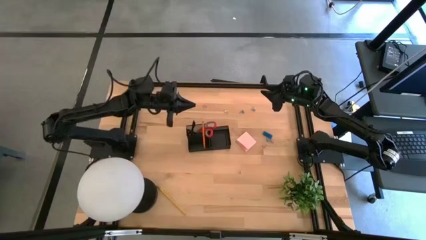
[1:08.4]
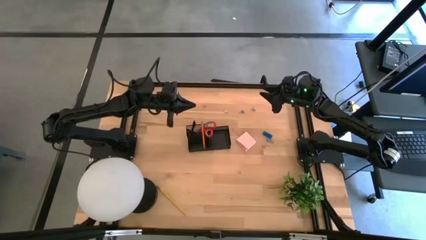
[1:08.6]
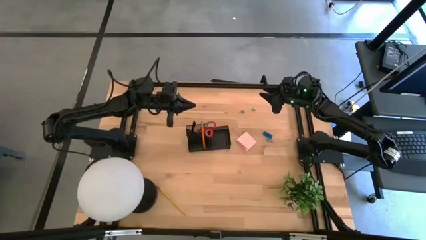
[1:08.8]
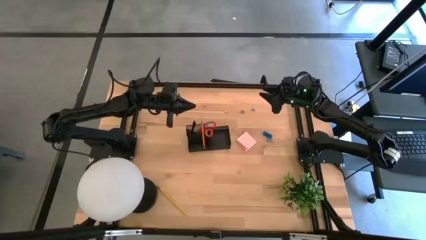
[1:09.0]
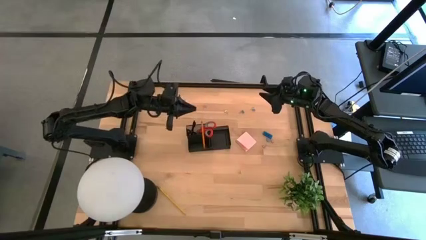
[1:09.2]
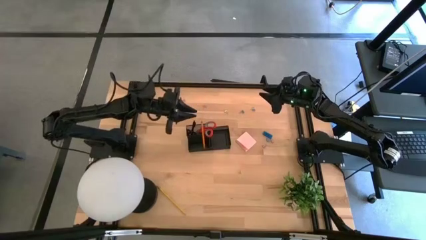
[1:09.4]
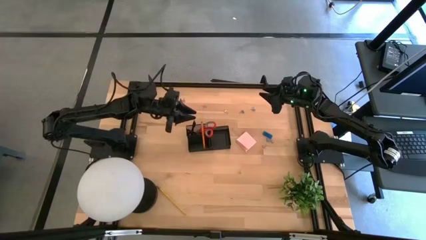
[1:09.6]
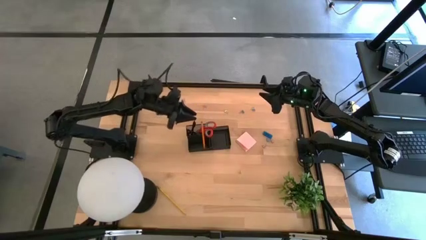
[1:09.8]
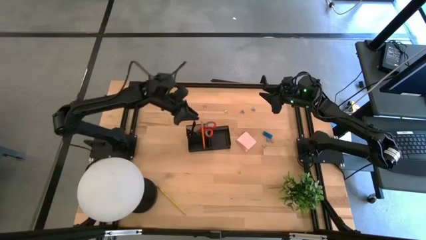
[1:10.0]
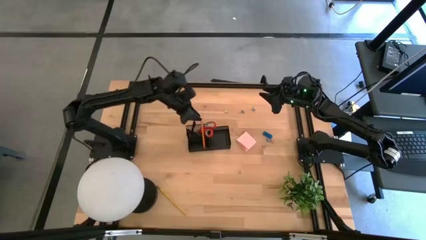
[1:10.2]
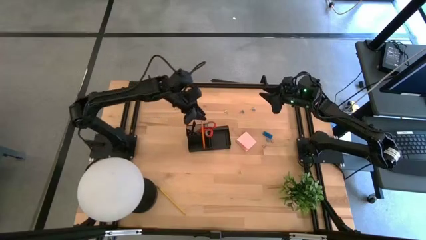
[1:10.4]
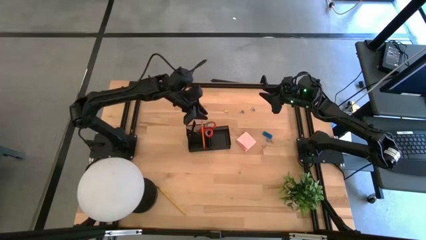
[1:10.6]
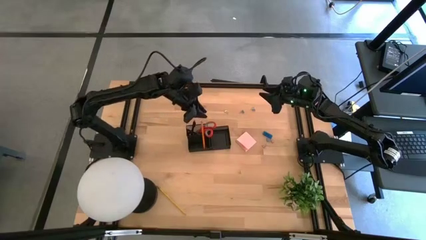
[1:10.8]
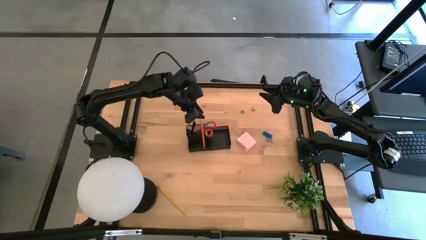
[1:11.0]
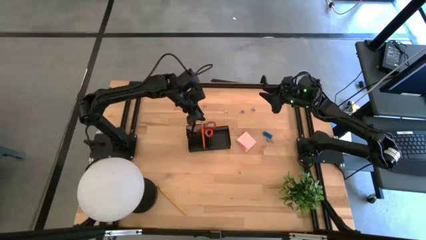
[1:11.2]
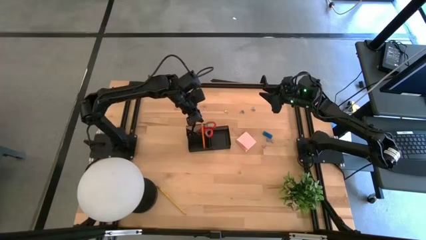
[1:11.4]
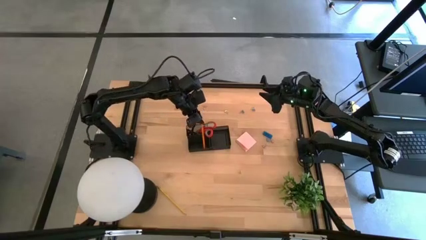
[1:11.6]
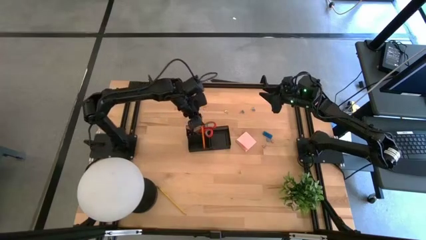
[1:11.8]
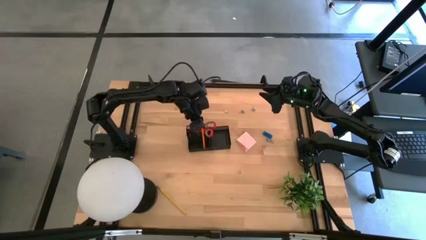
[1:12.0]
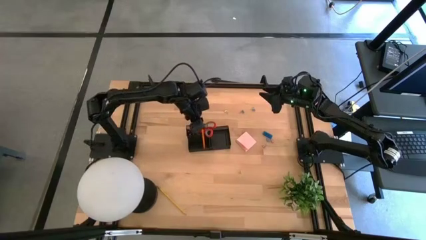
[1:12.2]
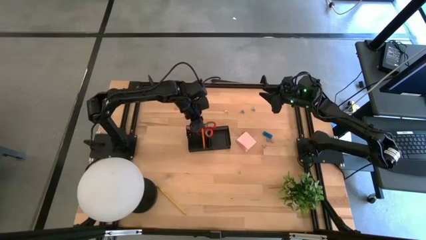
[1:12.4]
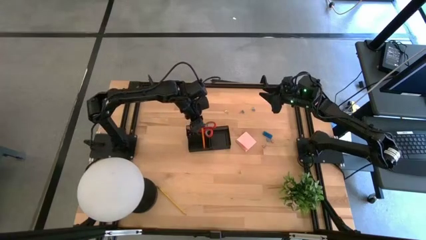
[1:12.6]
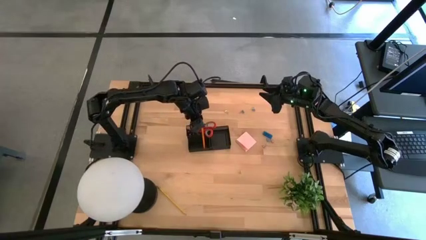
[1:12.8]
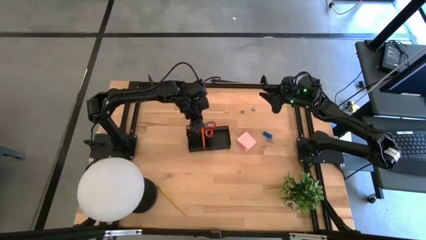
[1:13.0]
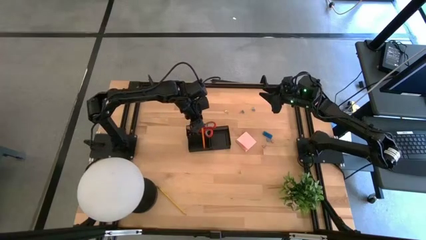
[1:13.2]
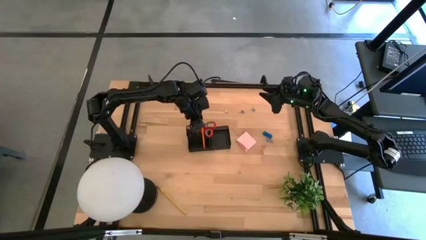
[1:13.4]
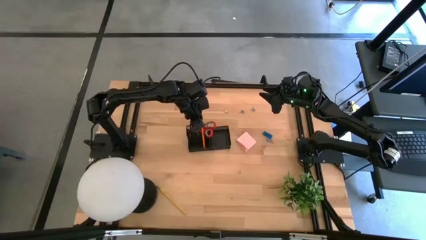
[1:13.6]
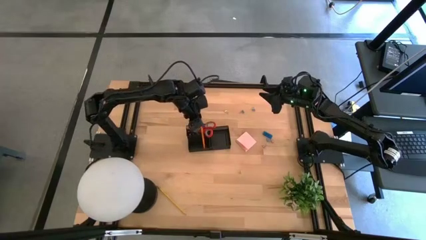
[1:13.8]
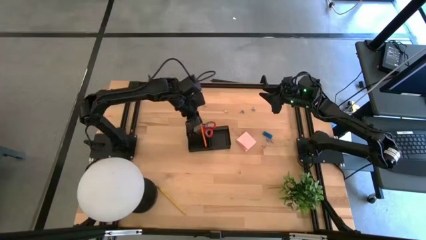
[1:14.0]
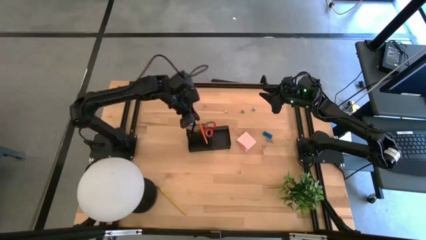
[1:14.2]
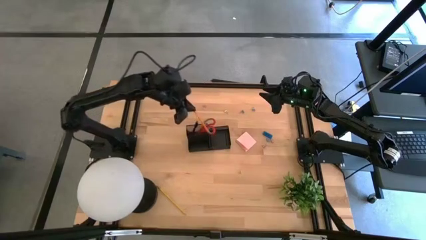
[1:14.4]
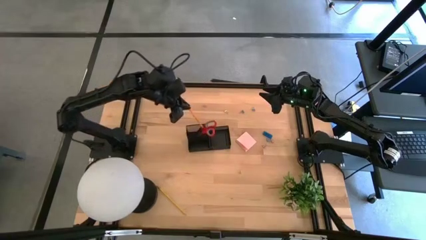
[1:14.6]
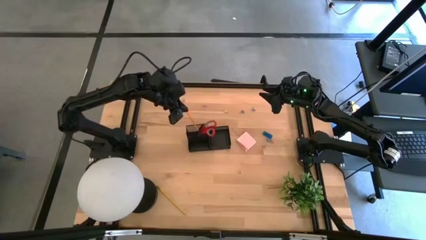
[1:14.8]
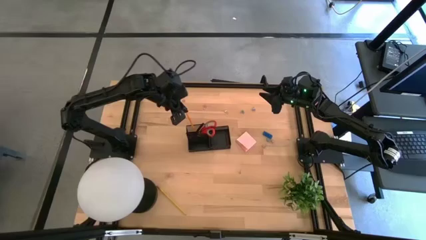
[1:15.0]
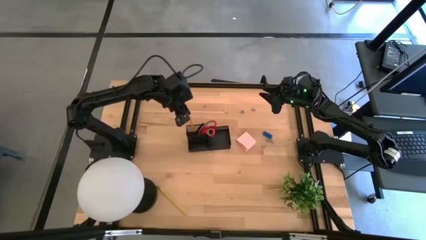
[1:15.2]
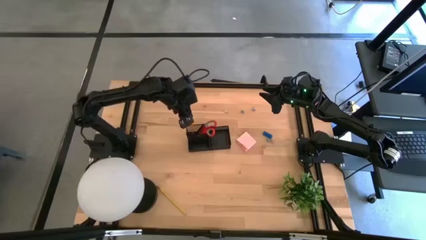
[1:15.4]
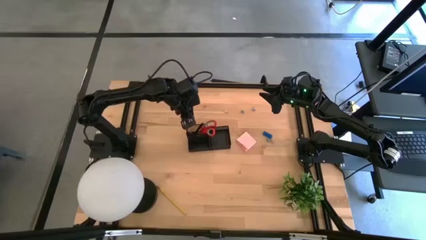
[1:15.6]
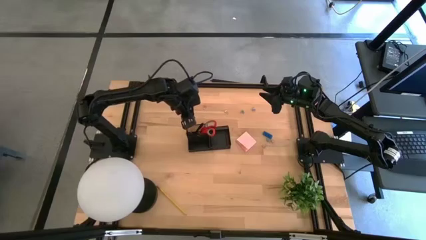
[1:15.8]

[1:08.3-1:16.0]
Task: Pick and place office supplies into organizer
Put the orange pencil into the desk organizer

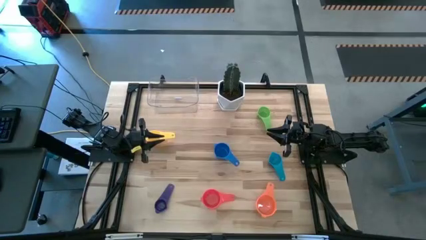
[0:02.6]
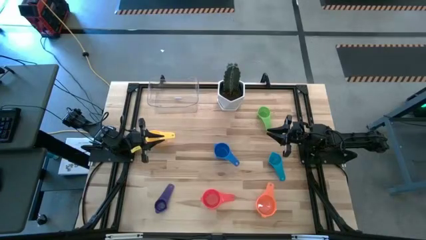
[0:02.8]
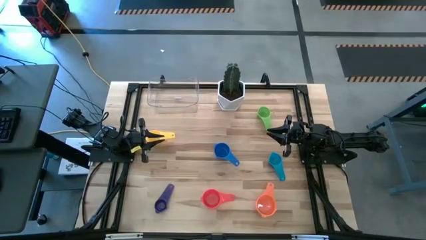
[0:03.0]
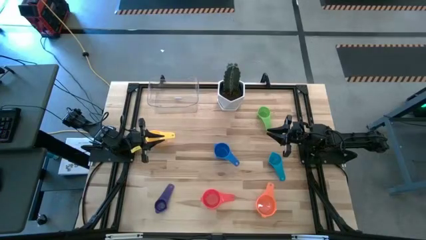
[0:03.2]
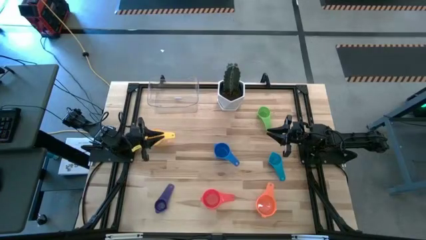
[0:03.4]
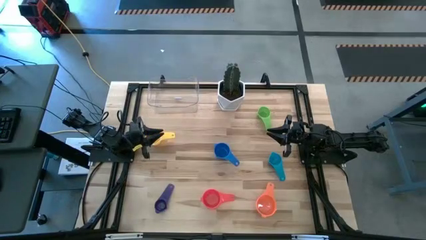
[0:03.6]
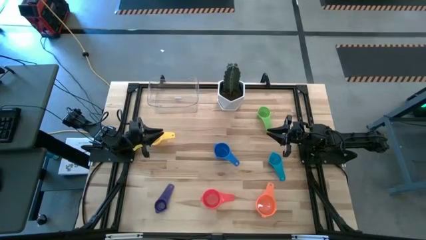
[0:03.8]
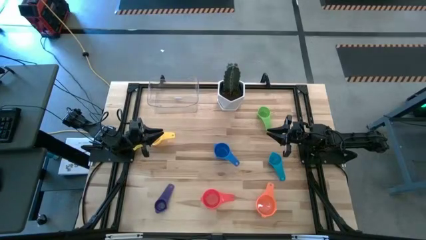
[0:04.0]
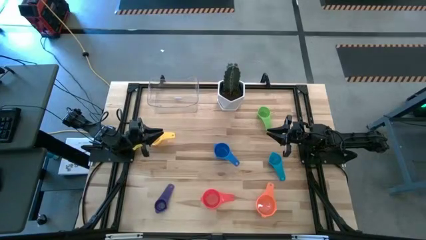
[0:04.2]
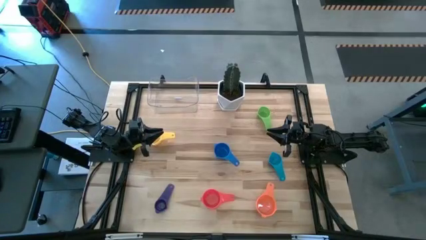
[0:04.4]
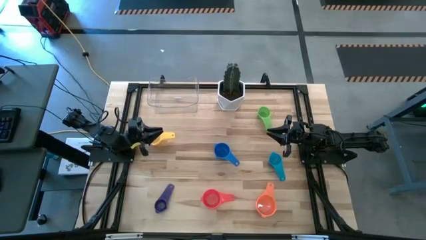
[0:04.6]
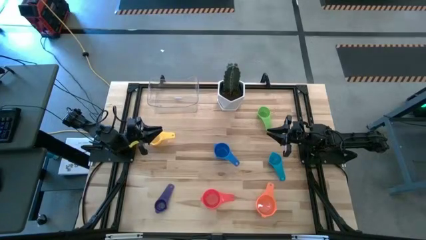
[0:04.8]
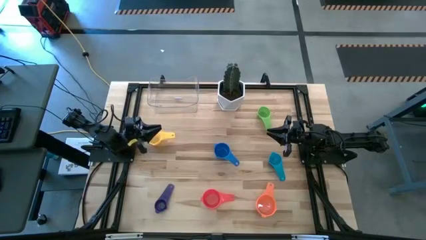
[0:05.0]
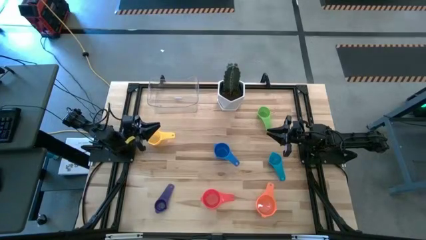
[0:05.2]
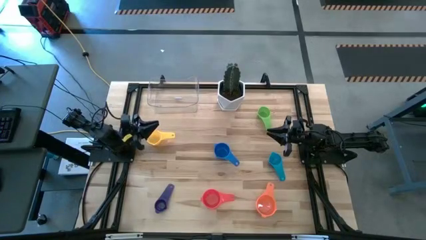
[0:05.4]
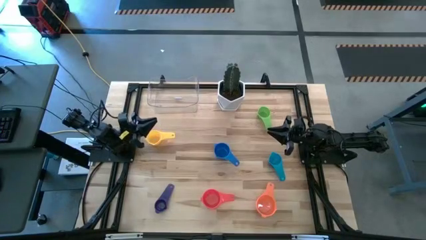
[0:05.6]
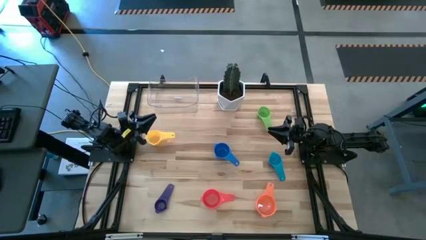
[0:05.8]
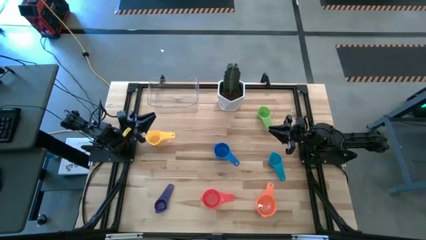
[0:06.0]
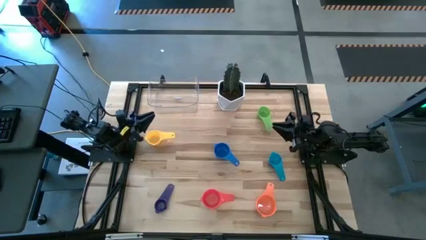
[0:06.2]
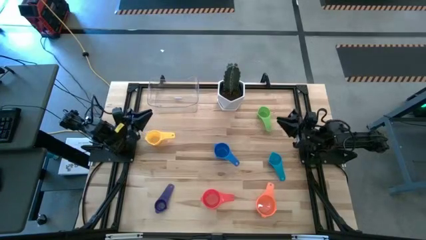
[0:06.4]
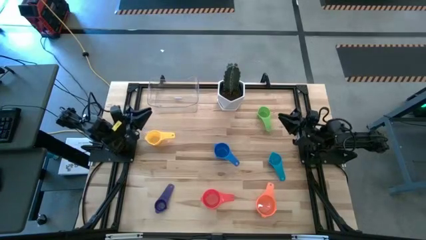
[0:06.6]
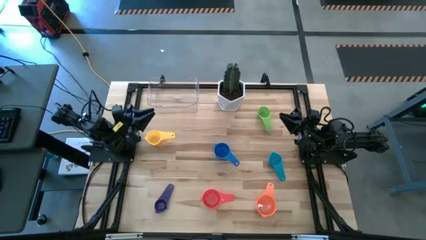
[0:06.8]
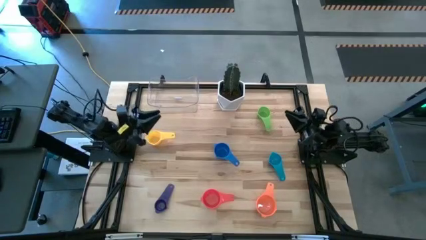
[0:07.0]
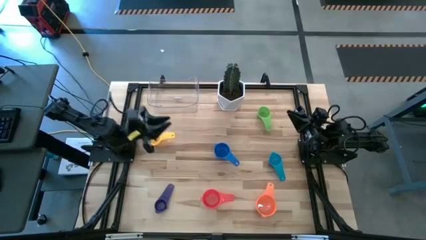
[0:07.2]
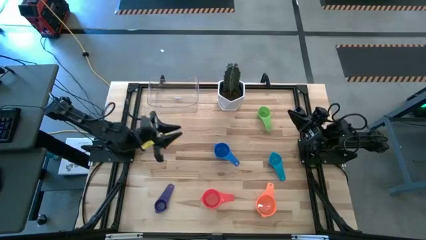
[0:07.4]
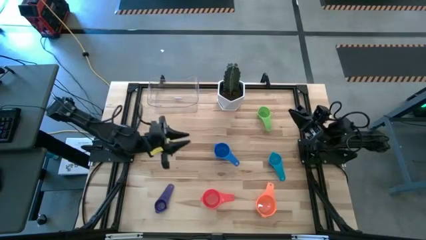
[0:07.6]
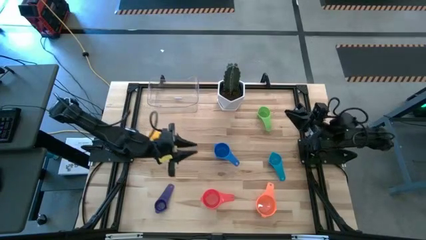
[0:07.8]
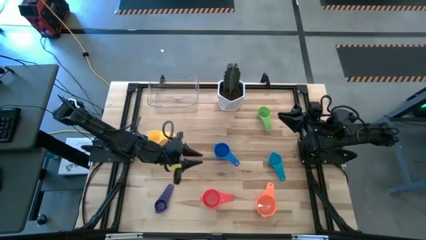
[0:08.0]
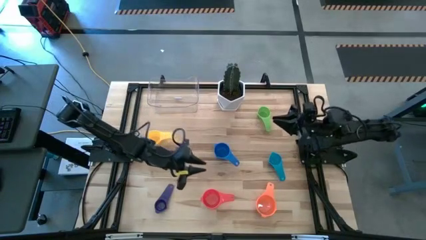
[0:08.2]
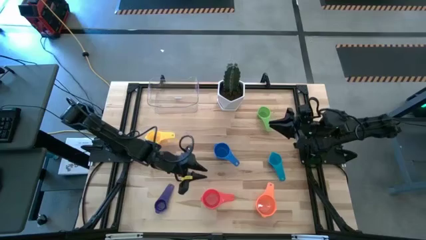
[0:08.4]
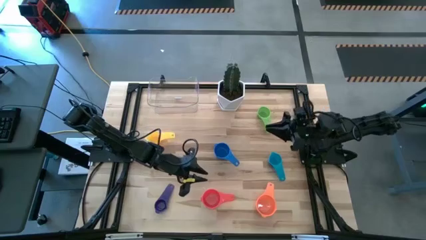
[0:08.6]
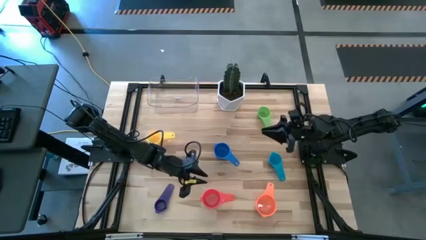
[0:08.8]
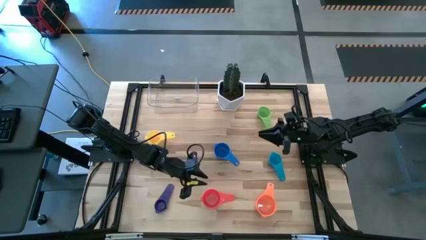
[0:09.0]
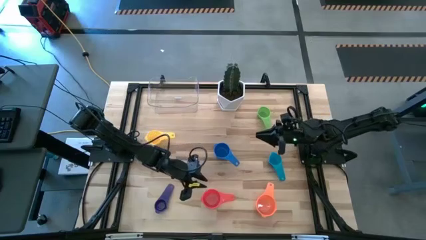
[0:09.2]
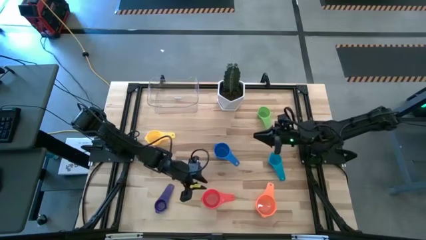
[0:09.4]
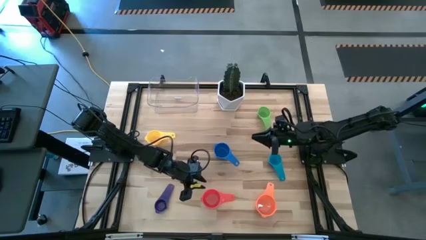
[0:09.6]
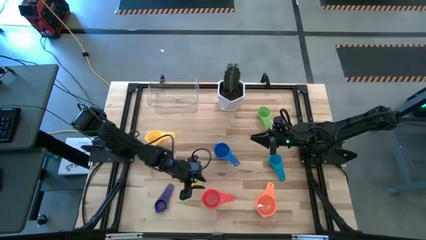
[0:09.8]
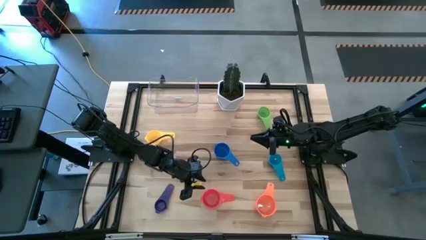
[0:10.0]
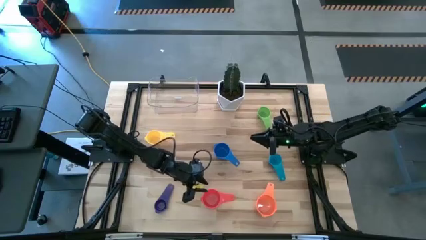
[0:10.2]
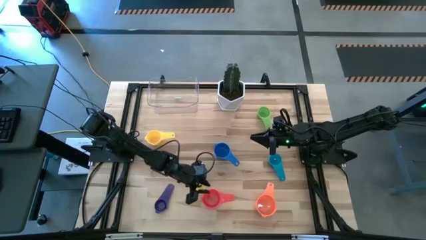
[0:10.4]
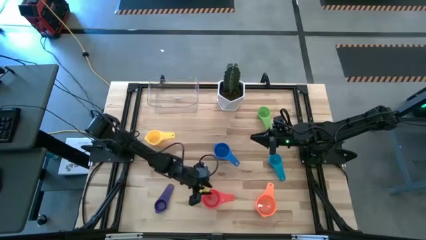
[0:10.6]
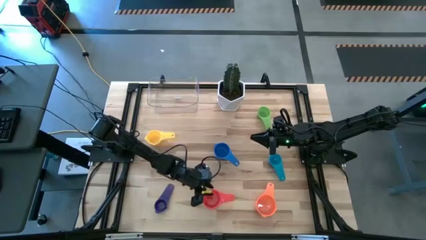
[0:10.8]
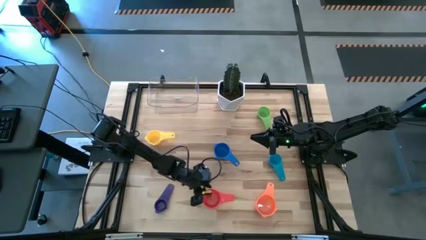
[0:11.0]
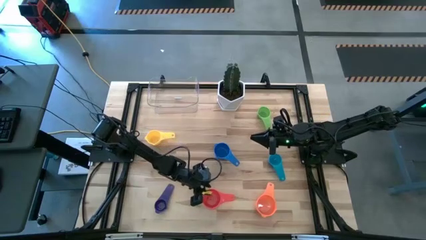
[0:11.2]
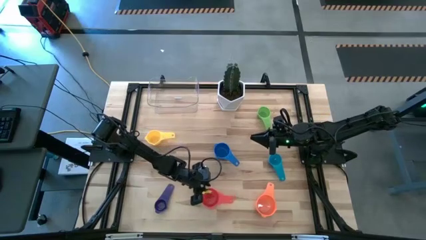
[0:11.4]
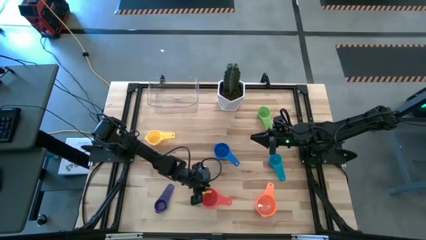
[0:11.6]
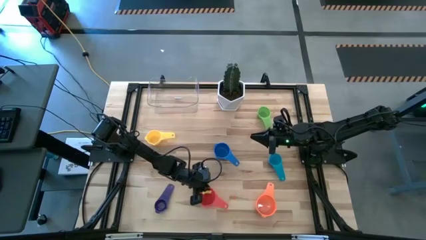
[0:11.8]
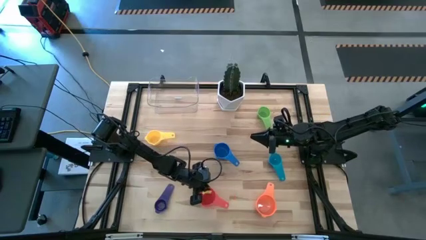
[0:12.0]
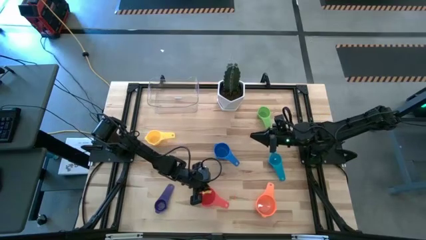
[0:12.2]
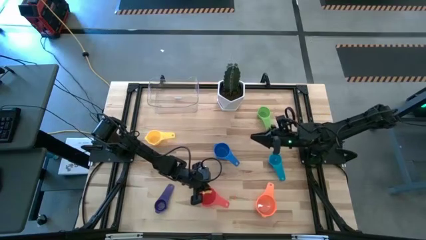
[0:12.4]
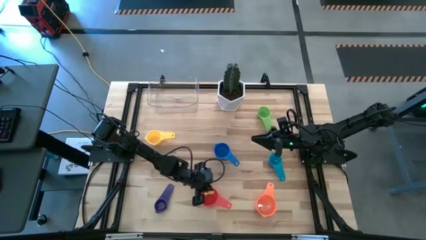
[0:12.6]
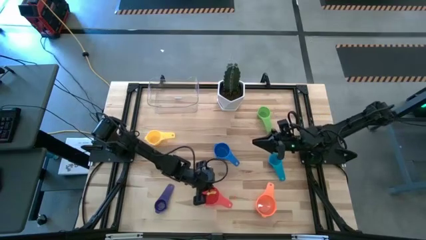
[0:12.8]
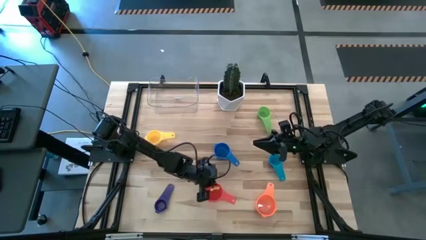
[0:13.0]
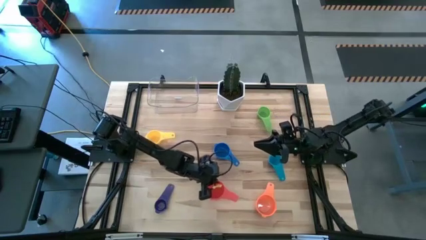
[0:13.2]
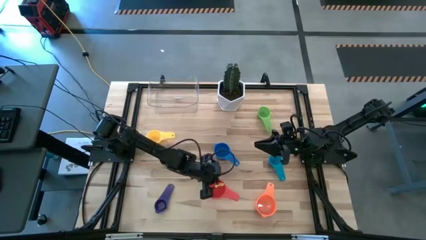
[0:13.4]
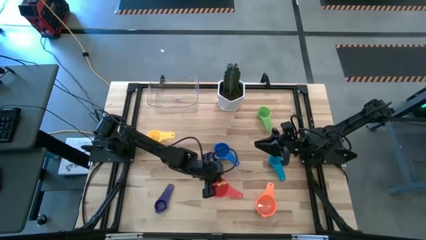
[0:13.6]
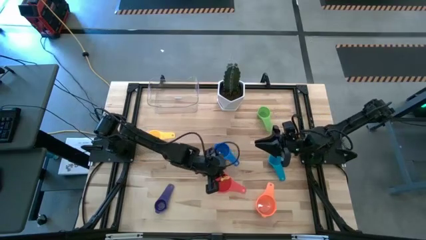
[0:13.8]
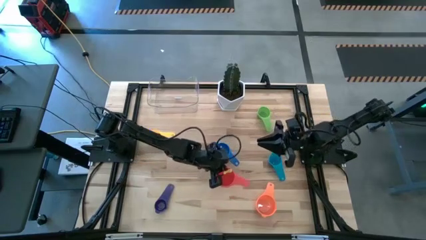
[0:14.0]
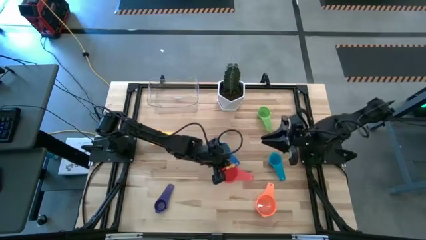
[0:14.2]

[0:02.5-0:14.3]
Task: Nest measuring cups in basket
Stack the red measuring cup on top of the orange measuring cup
